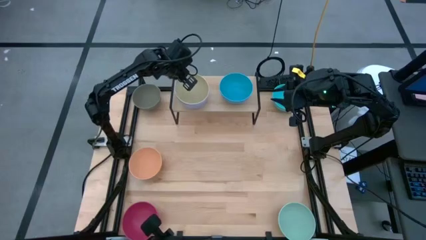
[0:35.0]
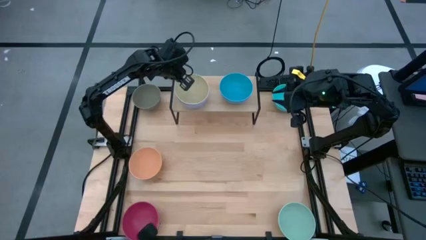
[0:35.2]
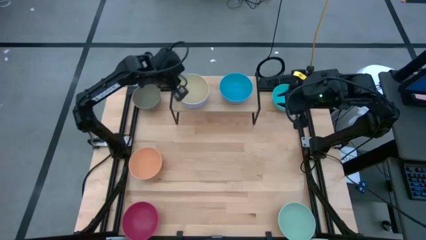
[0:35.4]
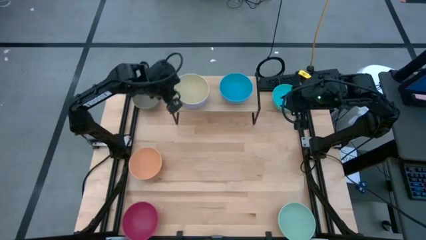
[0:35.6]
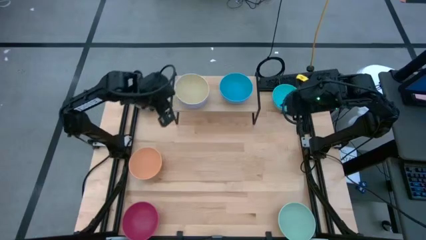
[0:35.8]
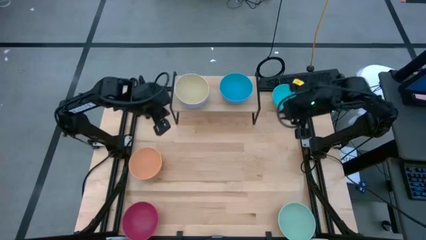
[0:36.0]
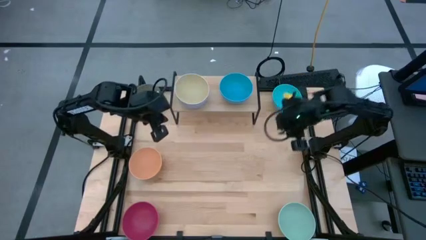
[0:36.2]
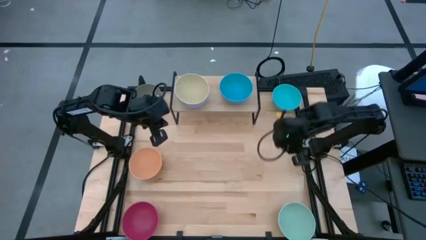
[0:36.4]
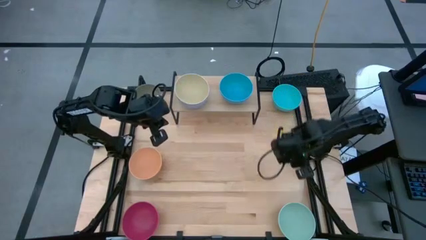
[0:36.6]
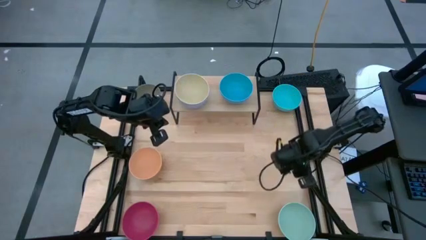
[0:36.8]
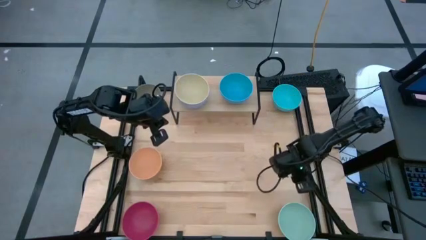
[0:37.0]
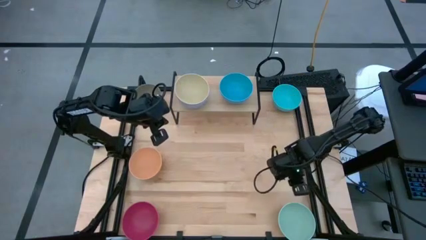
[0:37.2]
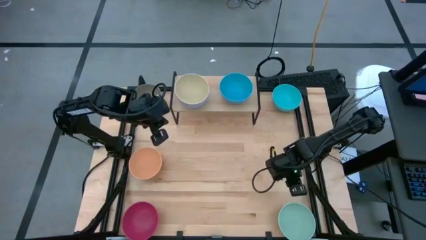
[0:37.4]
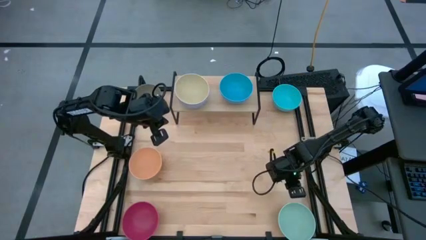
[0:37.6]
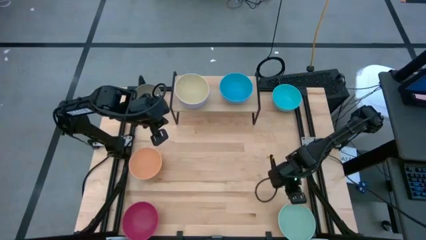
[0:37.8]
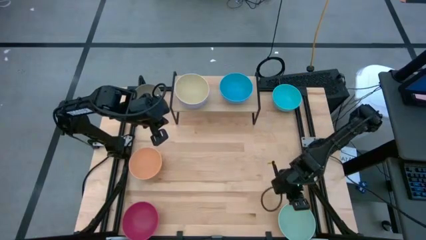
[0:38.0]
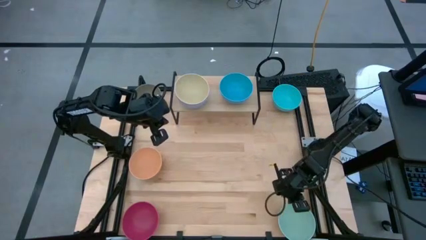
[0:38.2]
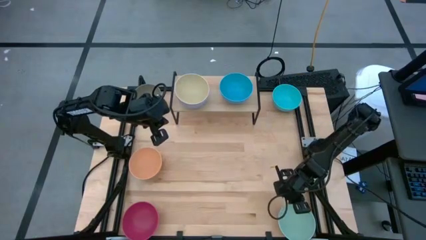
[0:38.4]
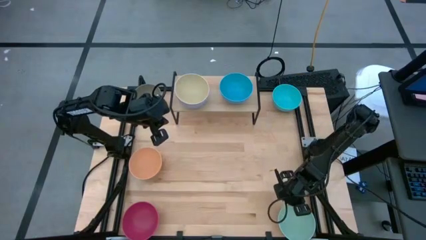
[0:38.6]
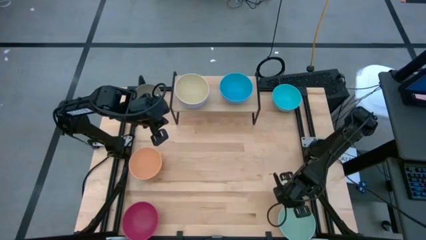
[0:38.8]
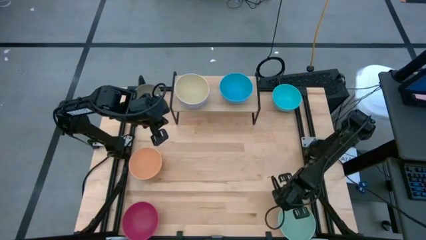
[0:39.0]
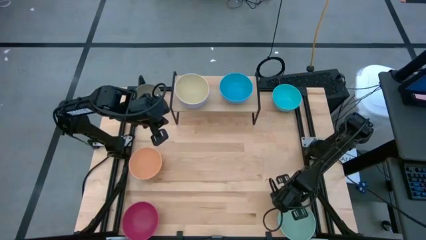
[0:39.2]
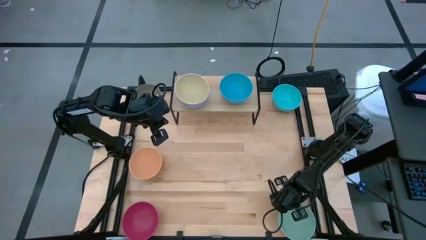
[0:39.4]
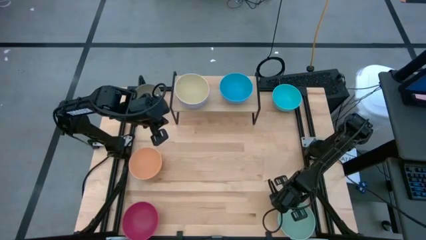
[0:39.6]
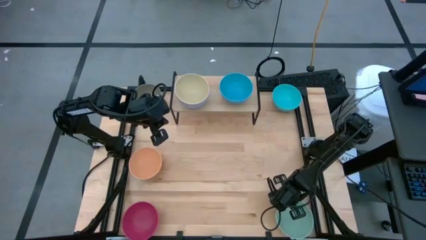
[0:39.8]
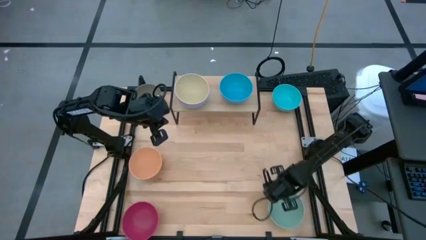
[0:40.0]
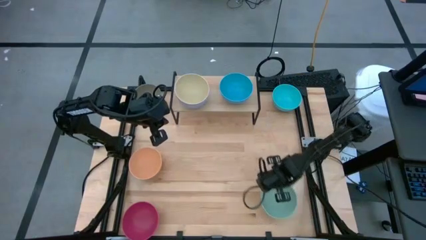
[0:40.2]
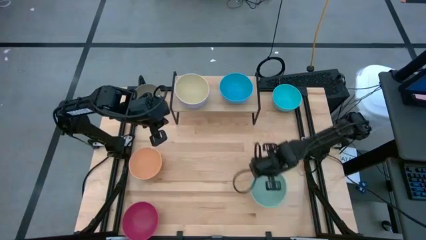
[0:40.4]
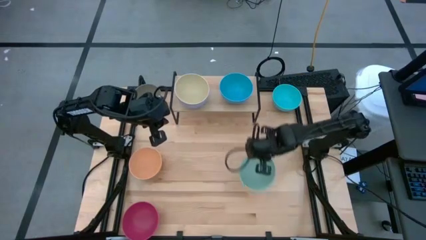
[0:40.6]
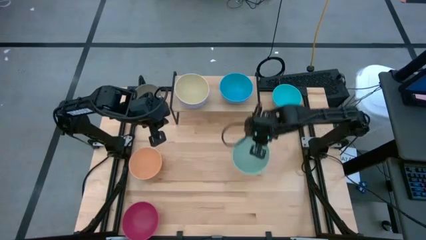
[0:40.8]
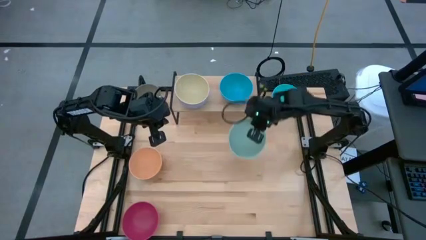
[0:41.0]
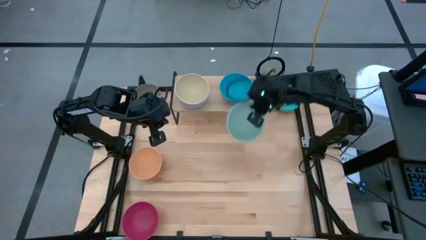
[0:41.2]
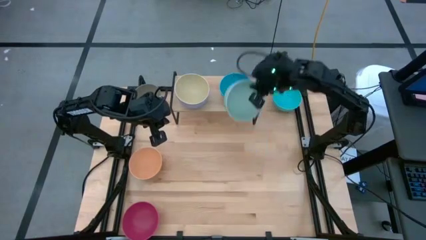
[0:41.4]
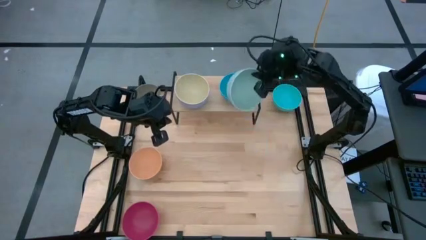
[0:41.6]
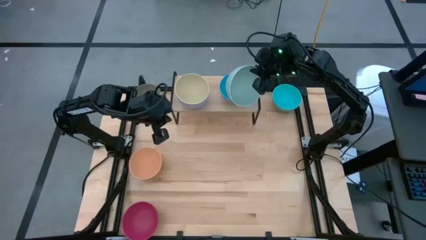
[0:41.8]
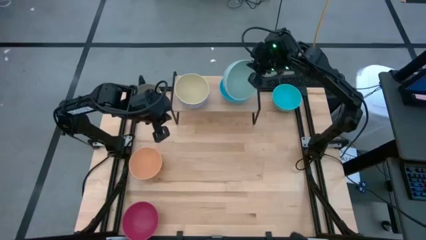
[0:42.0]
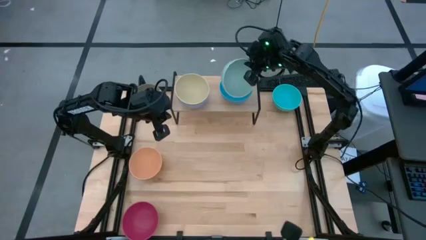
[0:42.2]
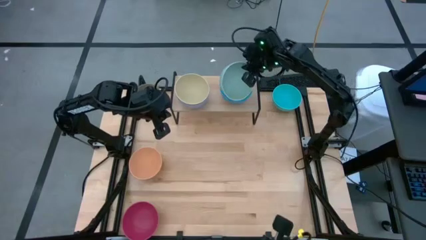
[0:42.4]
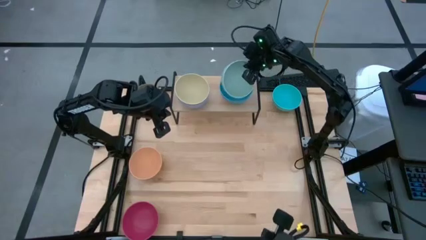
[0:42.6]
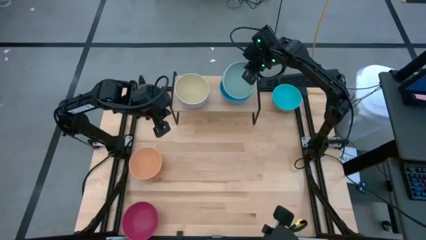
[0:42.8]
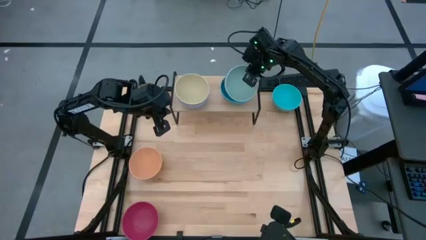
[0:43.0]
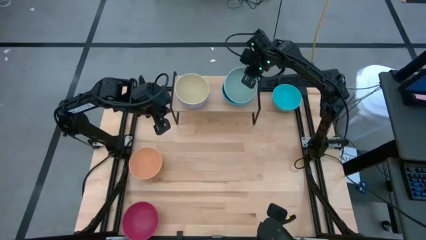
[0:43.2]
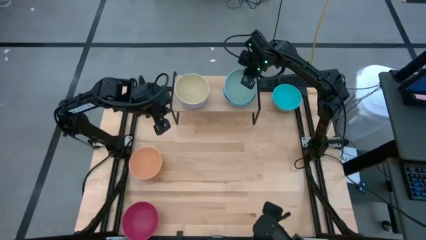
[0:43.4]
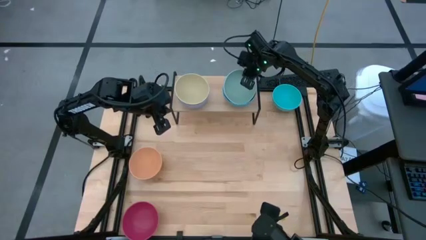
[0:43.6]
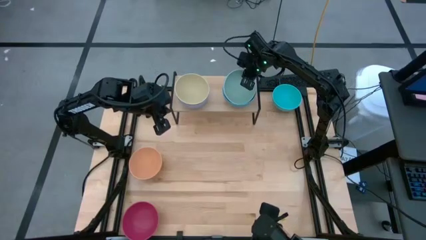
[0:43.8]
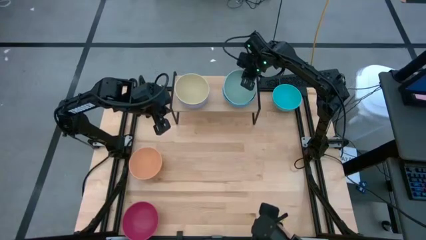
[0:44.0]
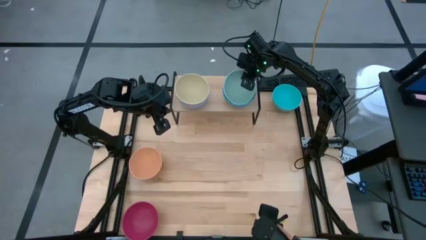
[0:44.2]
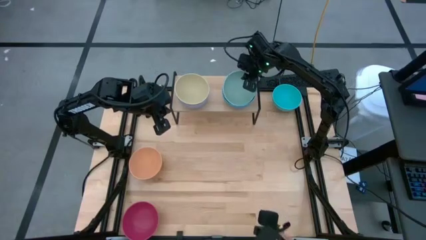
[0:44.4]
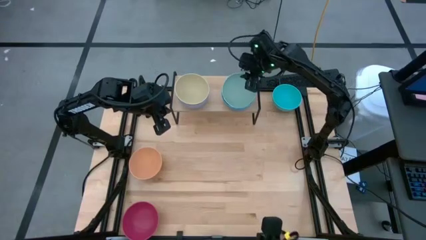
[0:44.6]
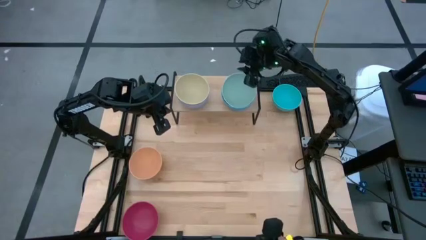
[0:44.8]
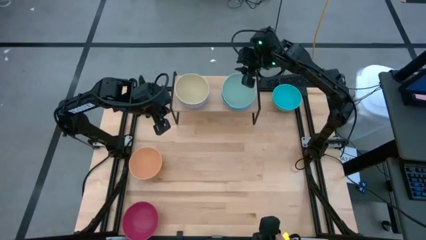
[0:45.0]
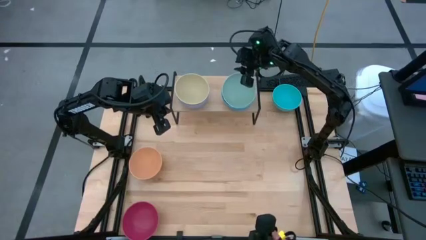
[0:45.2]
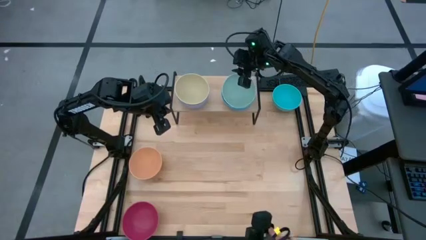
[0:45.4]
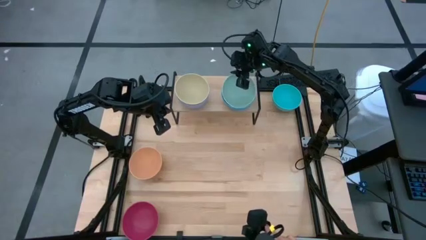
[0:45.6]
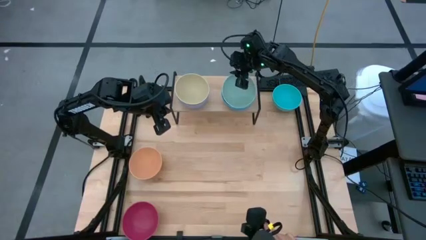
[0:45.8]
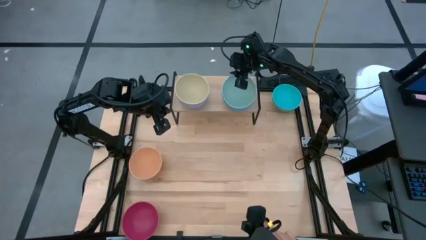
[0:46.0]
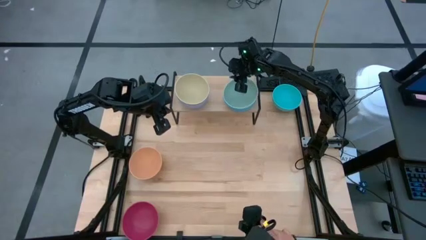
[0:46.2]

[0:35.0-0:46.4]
Task: Place and stack bowls onto a shelf
Stack the light green bowl on top of the blue bowl on the shelf

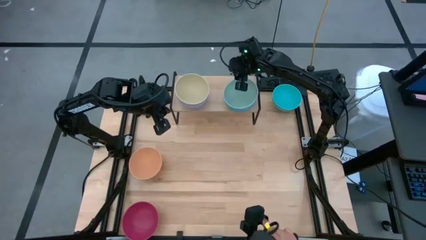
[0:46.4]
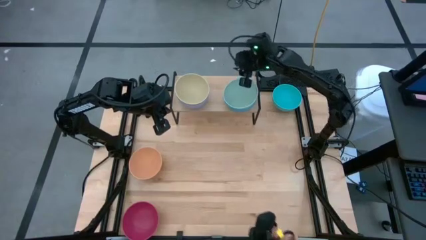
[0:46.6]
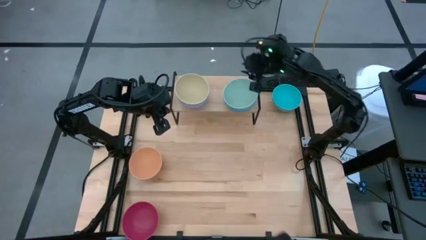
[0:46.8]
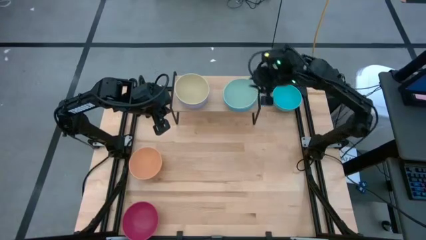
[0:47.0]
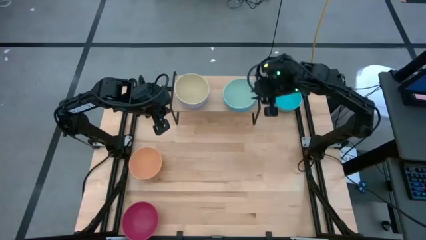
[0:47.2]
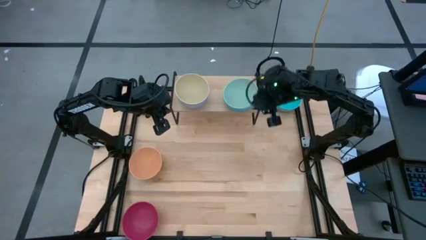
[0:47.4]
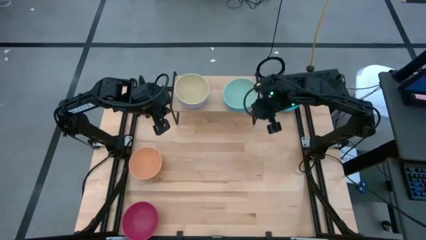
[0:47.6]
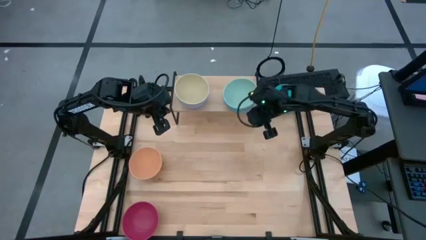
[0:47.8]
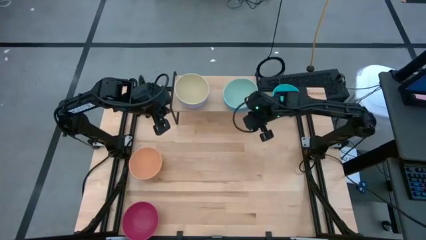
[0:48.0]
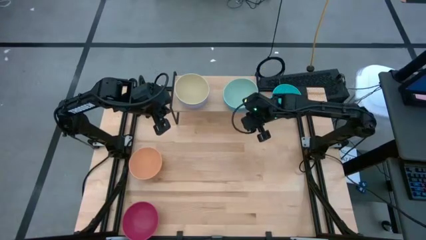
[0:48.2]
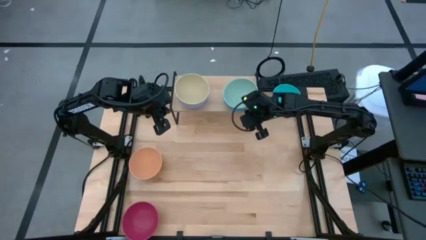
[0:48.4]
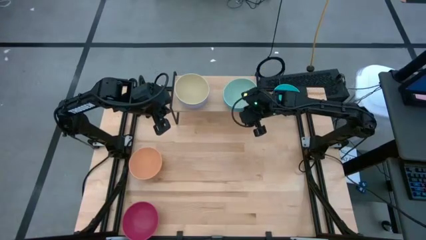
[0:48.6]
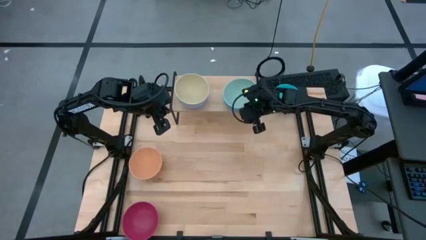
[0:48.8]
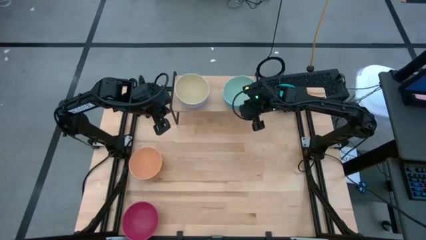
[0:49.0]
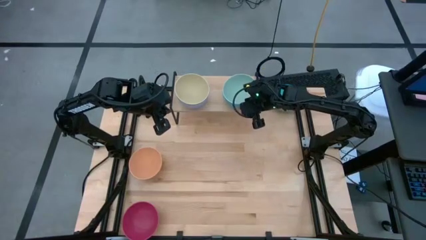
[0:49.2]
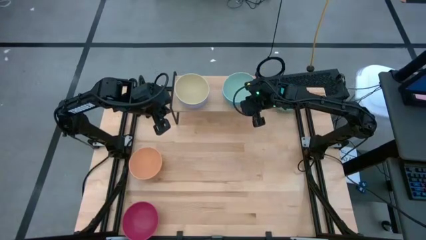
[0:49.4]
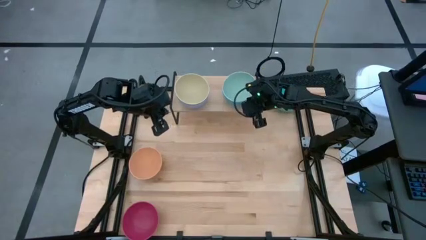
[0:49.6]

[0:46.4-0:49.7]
Adjust the right stacked bowls on the shelf

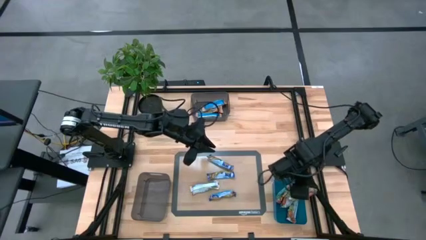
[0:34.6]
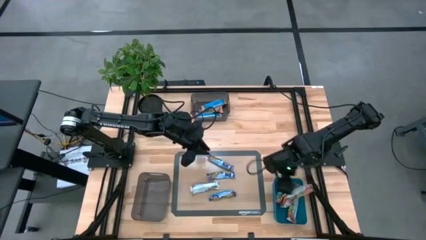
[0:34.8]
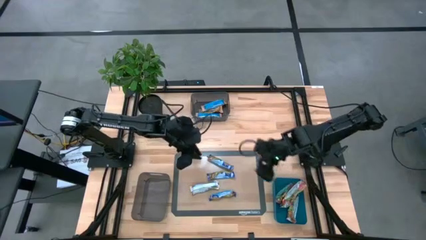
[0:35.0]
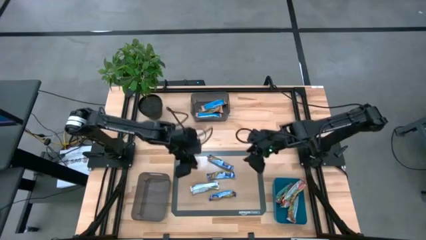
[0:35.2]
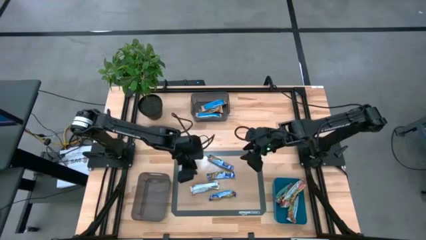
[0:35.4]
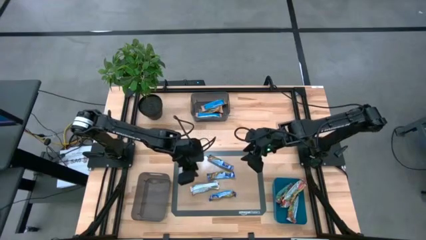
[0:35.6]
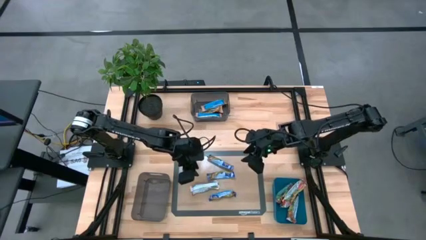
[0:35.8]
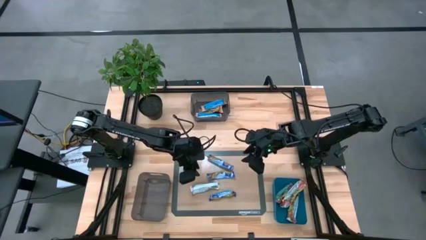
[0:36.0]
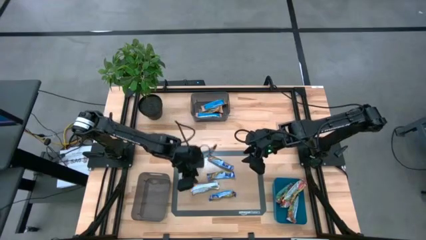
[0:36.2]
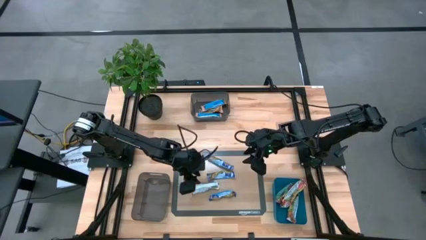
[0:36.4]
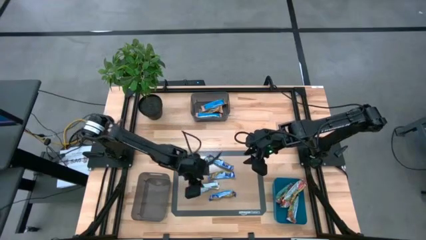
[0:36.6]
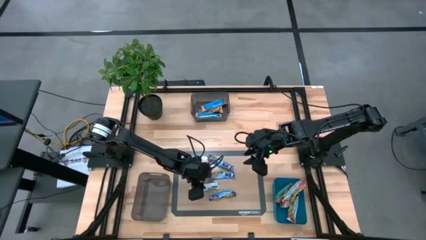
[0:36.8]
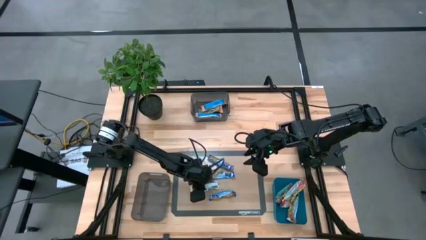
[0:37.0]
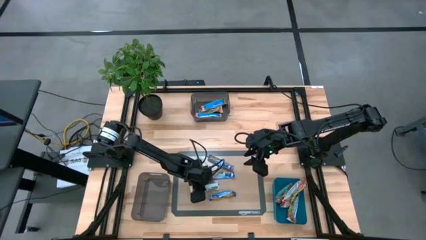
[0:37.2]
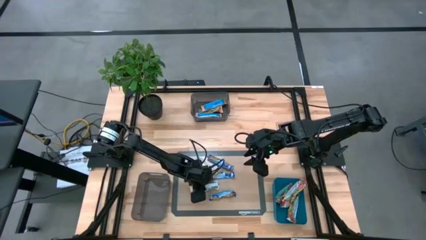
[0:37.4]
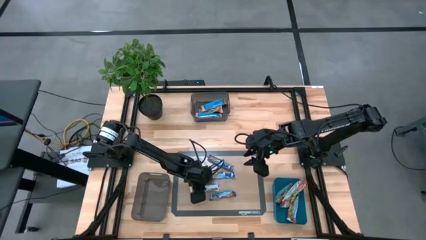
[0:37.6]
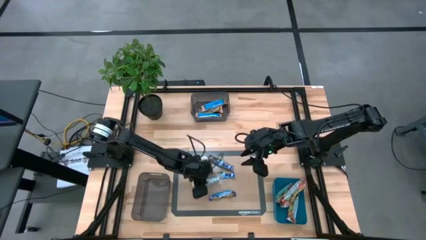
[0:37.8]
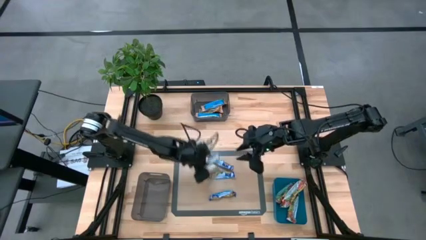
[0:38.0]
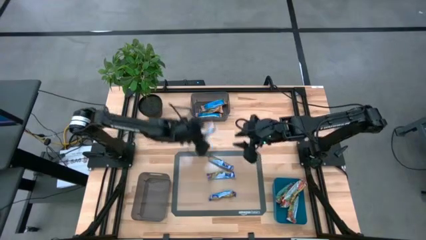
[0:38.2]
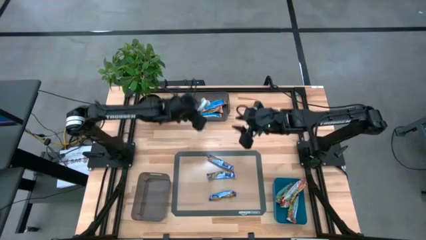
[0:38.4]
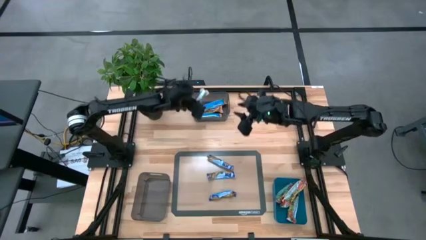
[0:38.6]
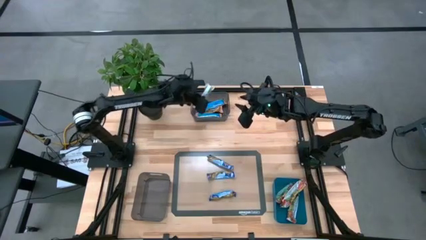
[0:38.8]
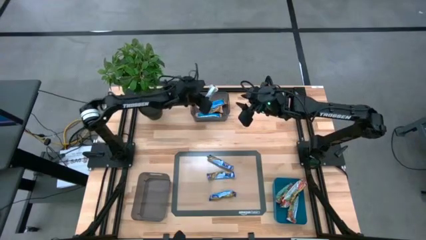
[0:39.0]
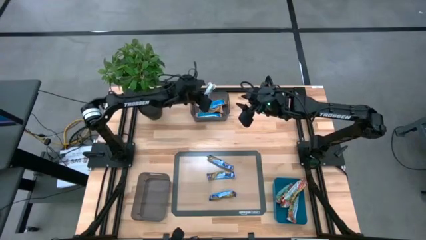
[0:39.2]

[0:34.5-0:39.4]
Task: Pick and place Granola Bars by type
Put the yellow granola bar into the top black transparent bin
